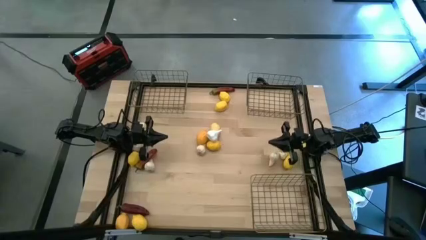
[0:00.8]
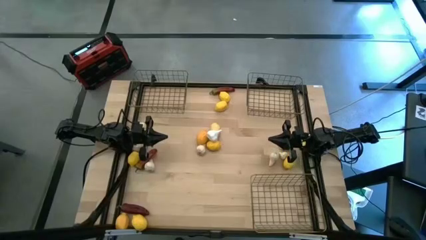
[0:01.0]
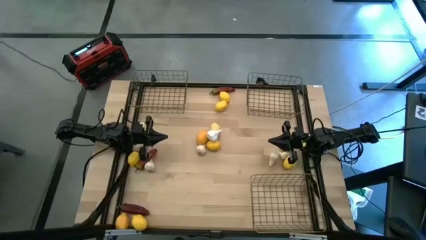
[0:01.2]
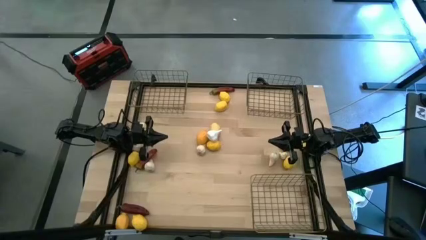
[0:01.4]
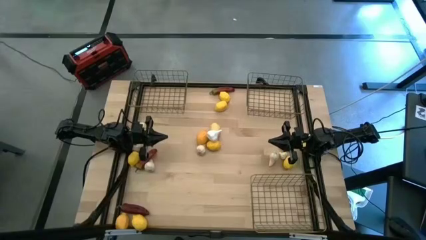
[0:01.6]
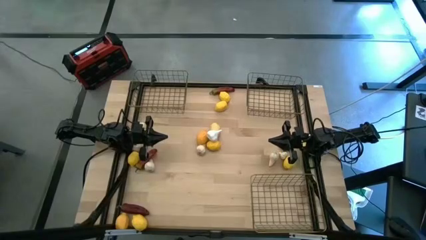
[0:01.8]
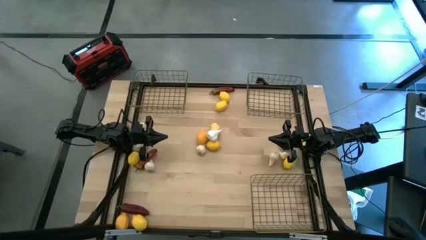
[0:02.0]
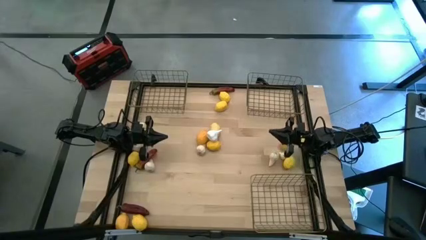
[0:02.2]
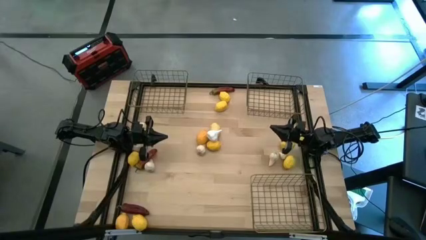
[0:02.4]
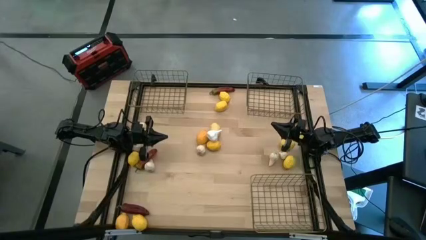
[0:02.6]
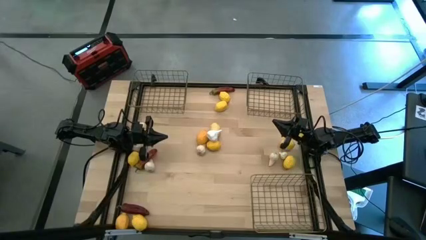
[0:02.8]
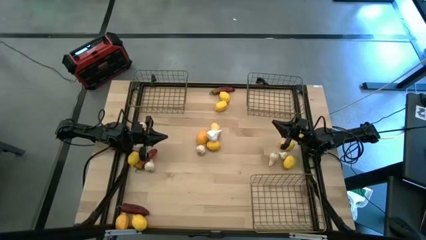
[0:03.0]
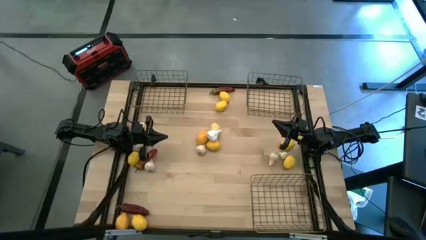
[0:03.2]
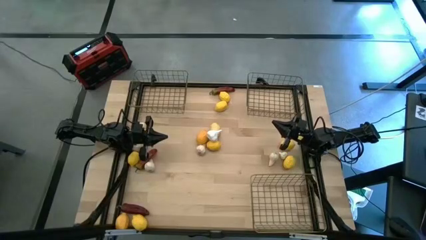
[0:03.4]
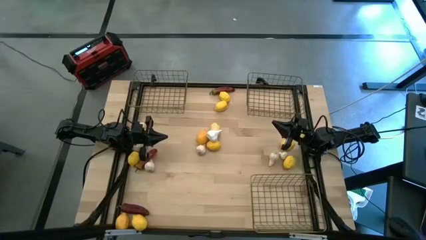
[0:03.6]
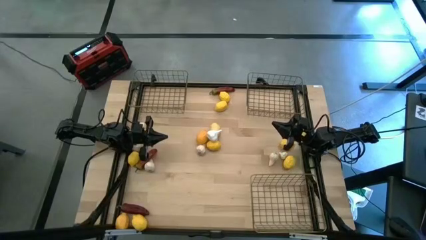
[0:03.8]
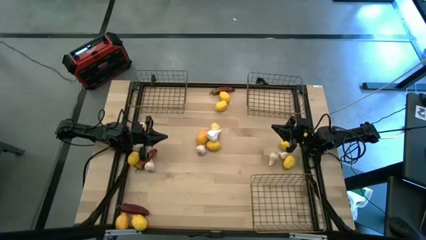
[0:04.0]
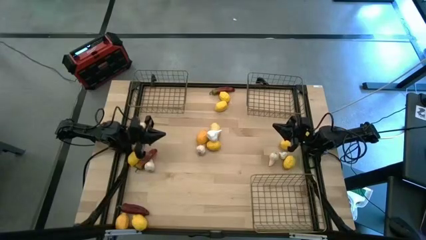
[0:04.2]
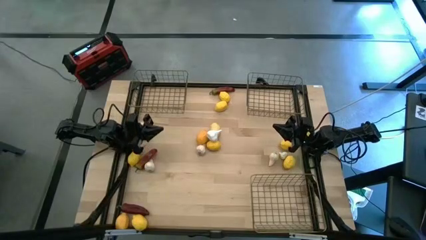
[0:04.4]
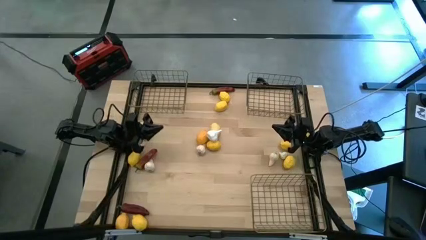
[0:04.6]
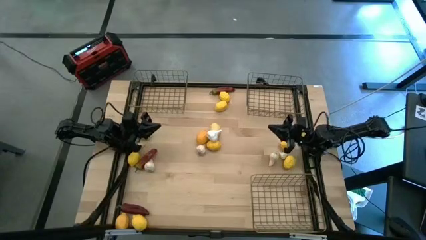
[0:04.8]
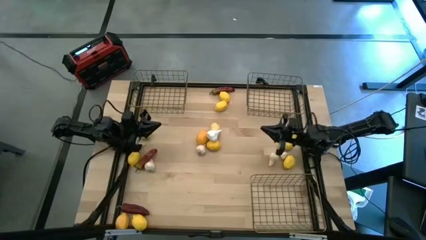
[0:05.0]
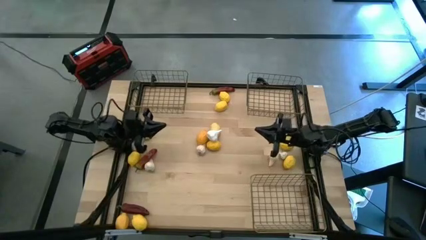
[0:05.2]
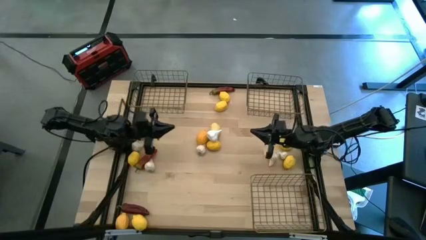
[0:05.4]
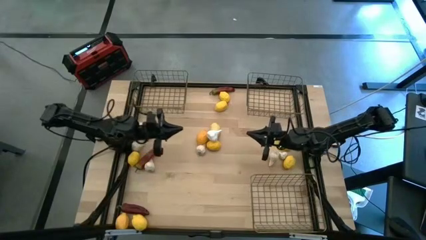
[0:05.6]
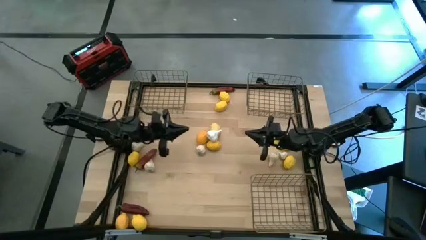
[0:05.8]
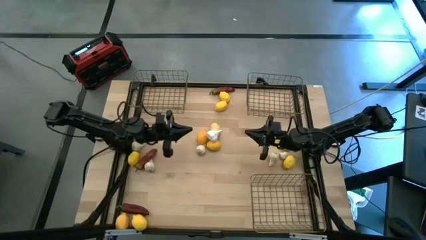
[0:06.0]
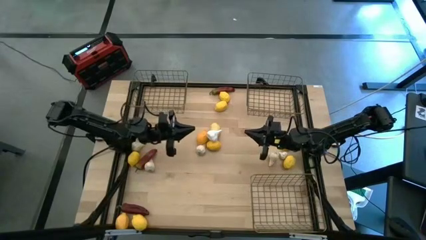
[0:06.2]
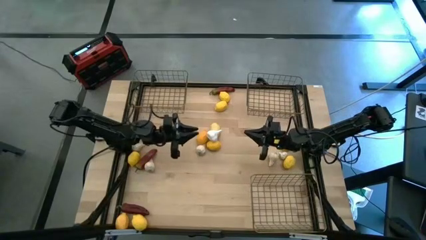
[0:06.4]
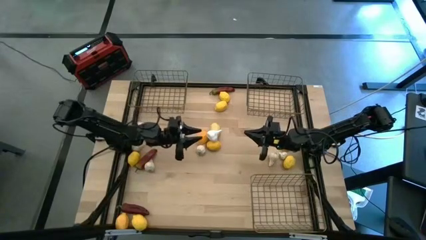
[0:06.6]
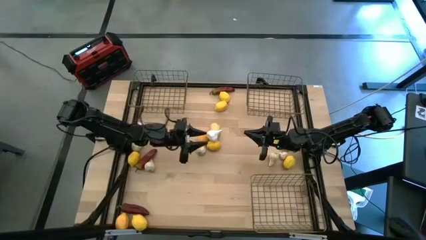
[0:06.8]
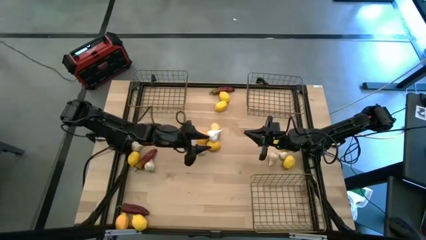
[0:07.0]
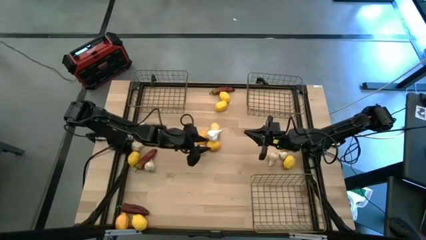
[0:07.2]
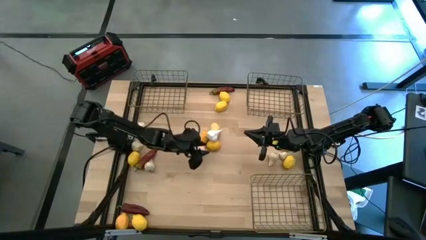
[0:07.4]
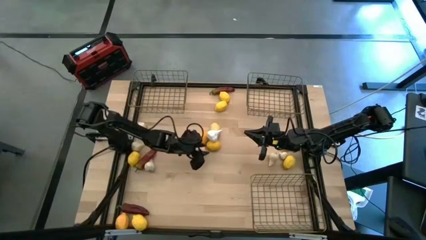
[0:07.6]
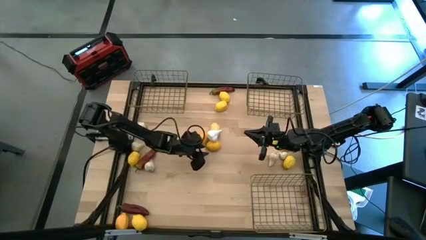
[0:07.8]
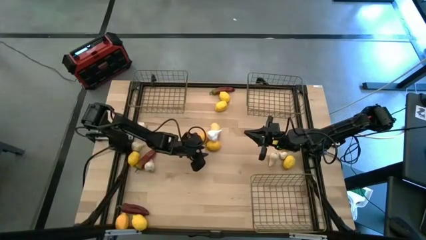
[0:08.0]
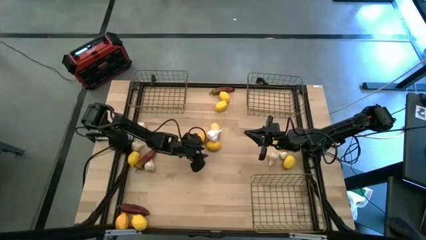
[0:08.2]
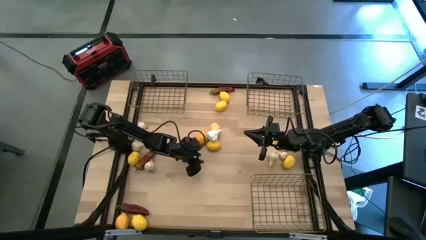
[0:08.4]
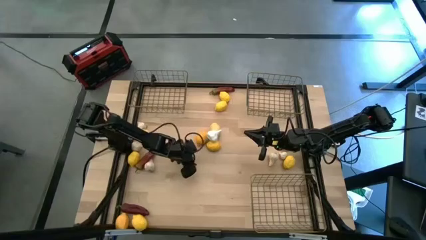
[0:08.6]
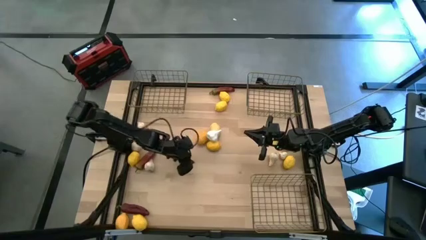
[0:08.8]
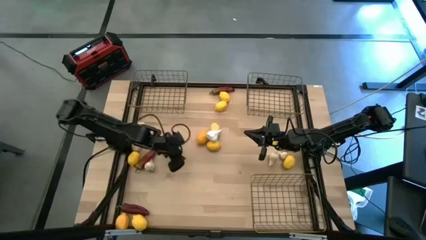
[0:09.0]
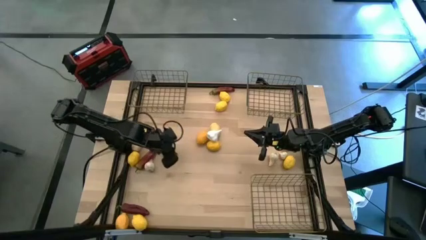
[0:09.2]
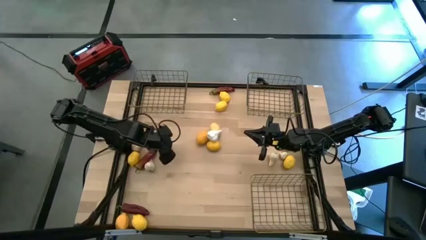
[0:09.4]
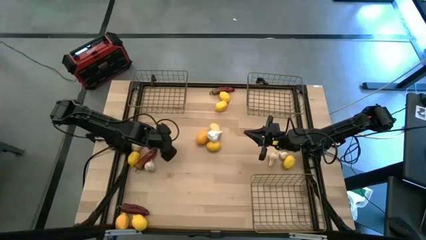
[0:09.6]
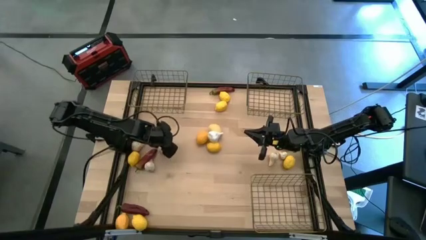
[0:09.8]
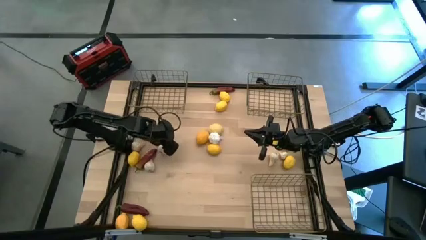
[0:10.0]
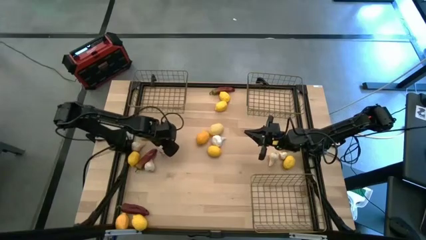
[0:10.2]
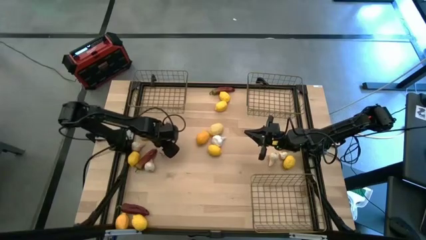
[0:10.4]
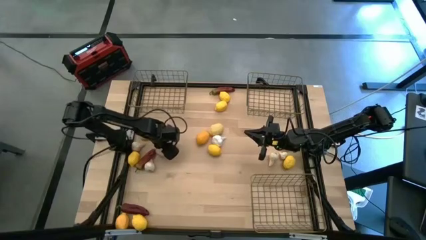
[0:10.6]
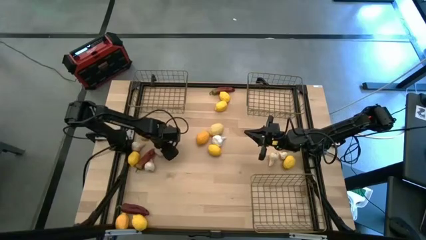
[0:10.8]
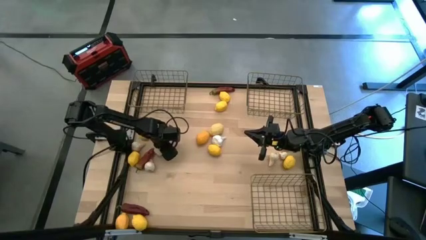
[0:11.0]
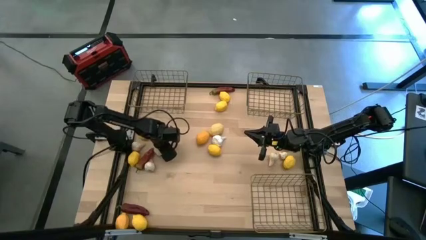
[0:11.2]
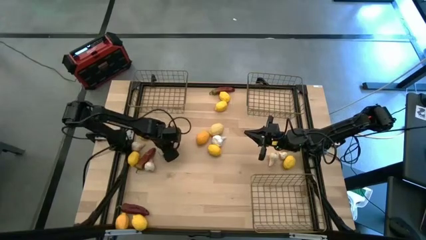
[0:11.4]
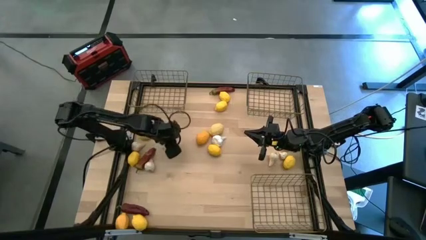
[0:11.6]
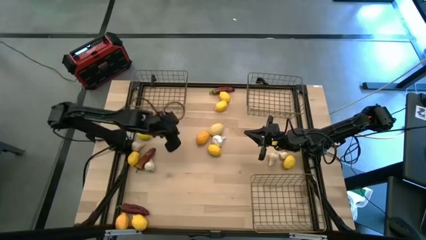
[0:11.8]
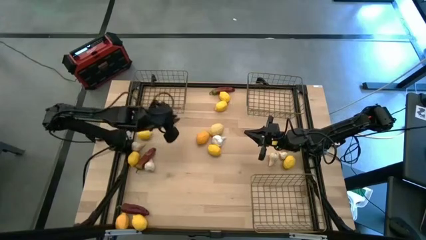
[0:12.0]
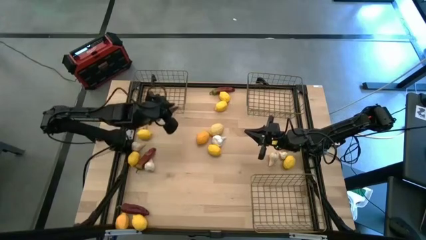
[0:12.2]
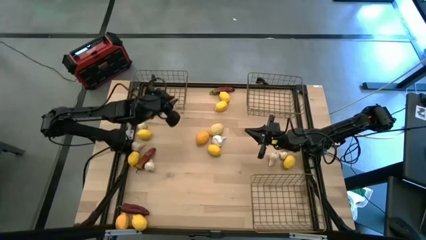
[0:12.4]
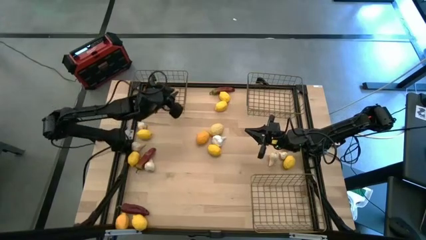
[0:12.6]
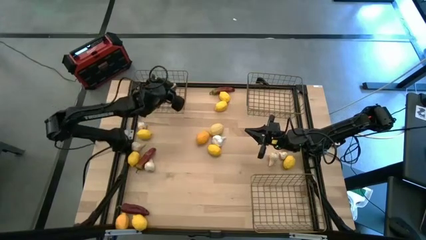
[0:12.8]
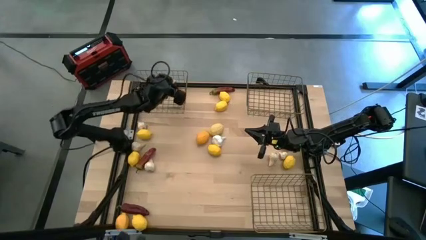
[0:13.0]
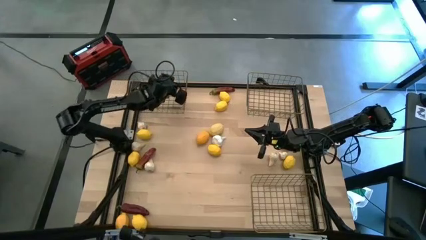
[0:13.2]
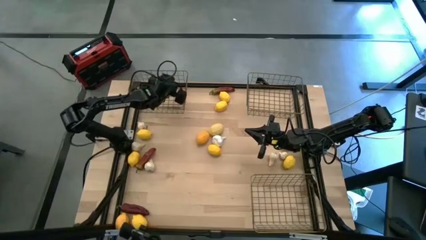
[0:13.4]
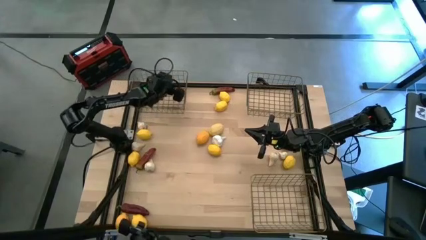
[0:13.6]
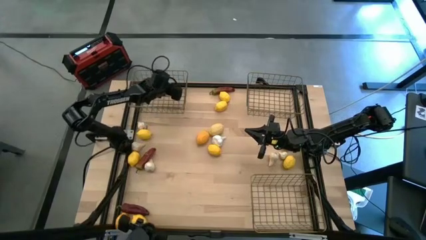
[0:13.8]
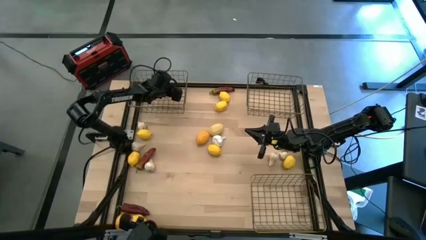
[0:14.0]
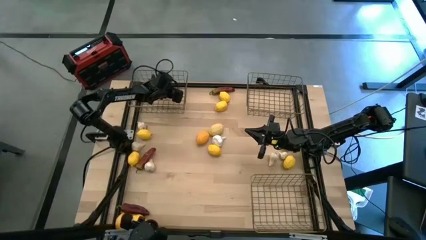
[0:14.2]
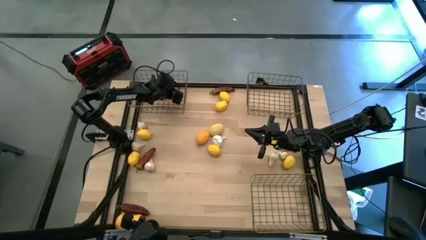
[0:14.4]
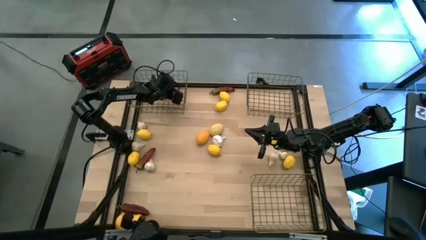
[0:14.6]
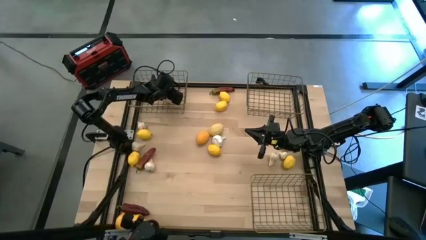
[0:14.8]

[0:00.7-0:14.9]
Task: Sort produce into baskets
Put the white garlic into the top left wire basket
